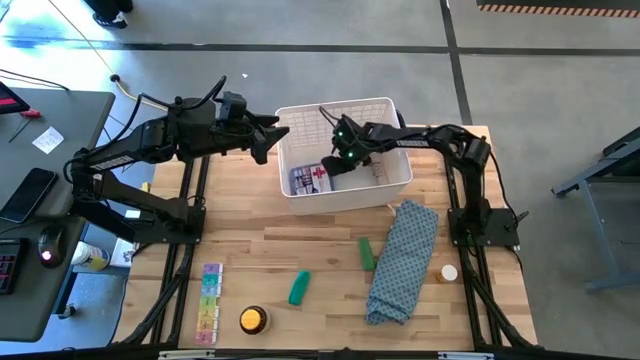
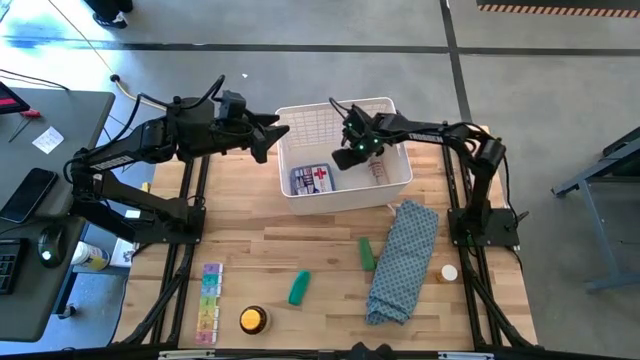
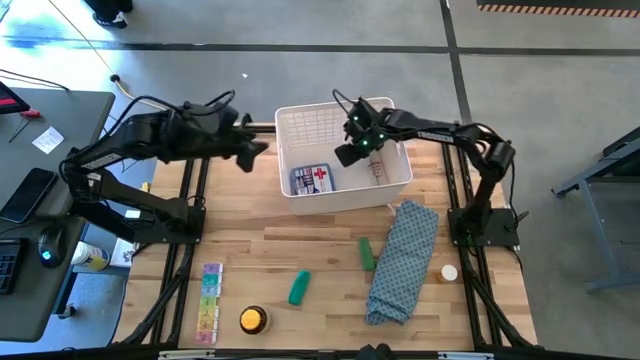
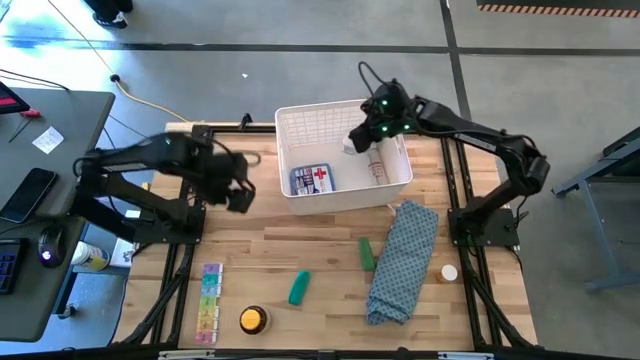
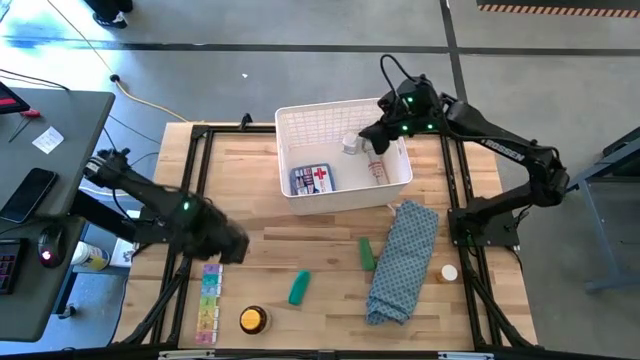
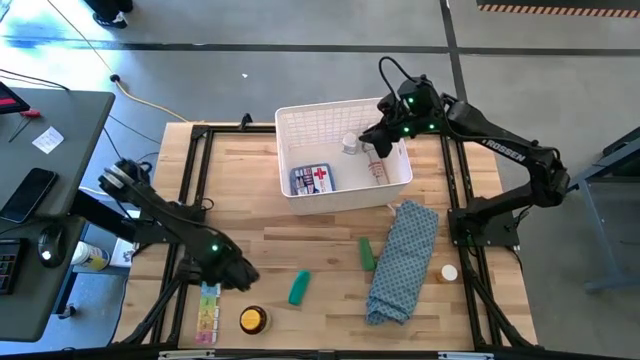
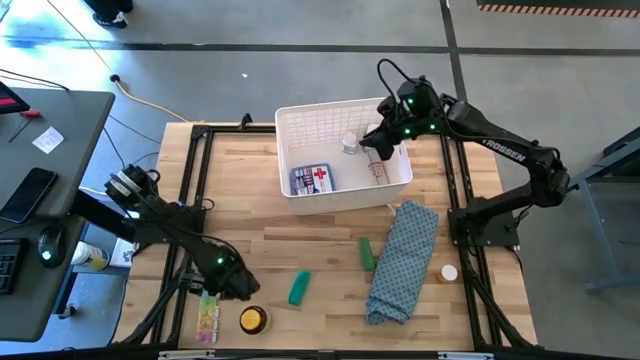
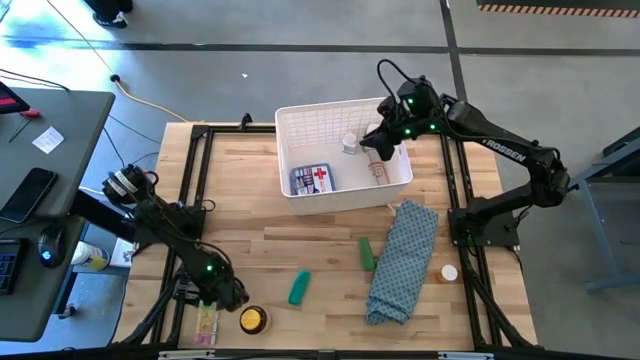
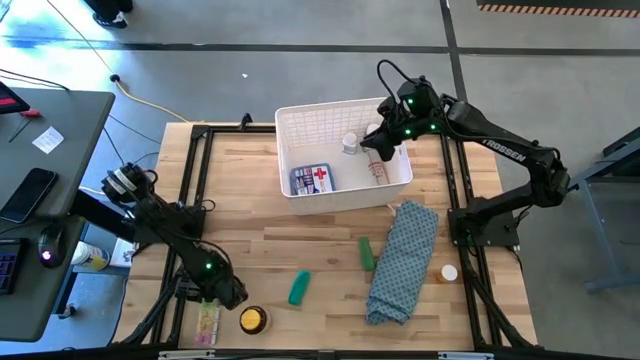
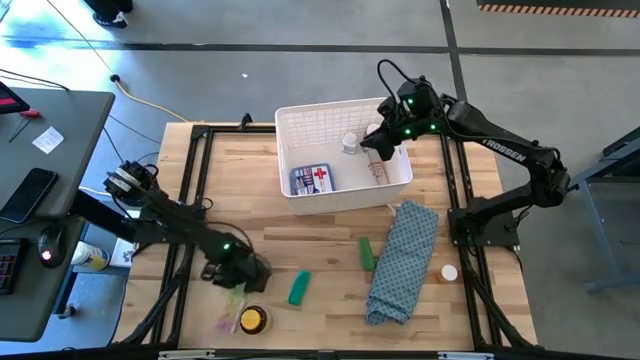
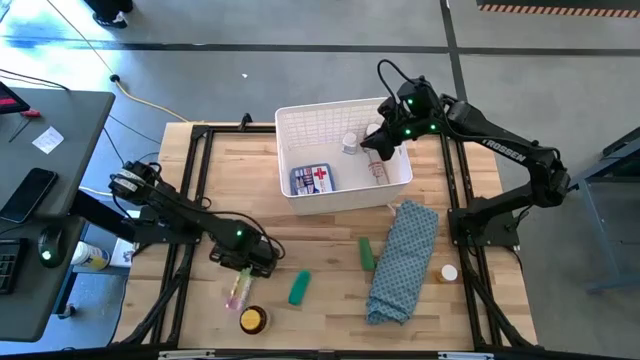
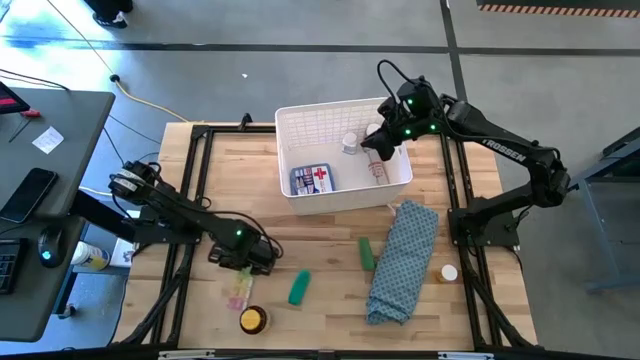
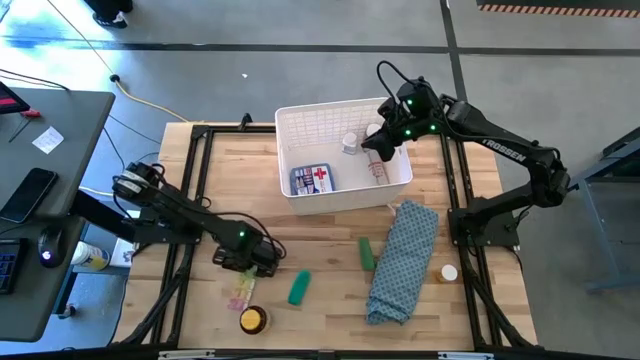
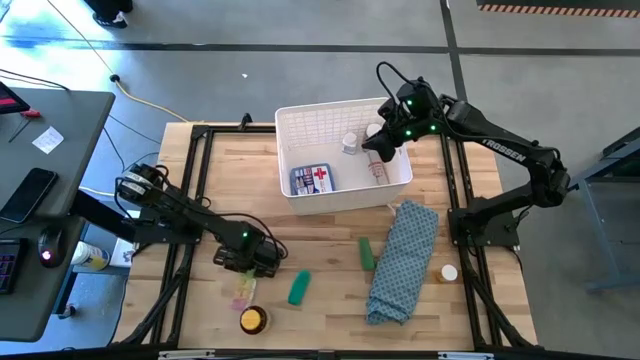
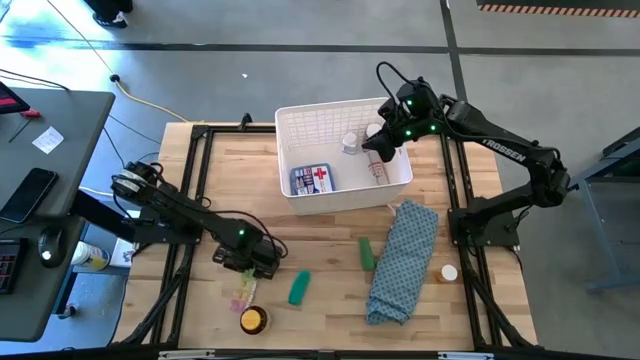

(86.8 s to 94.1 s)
Task: Pick & place medical supplies in basket/bin
Put the medicine organizer into the white bin

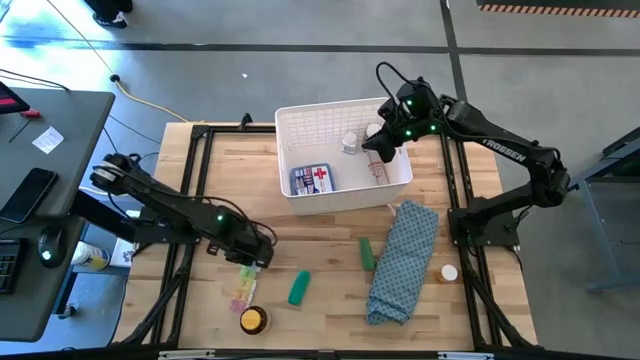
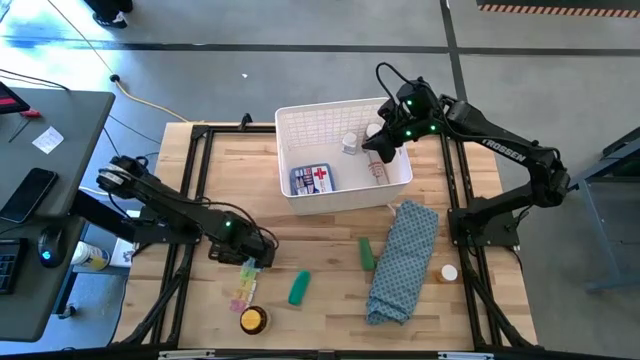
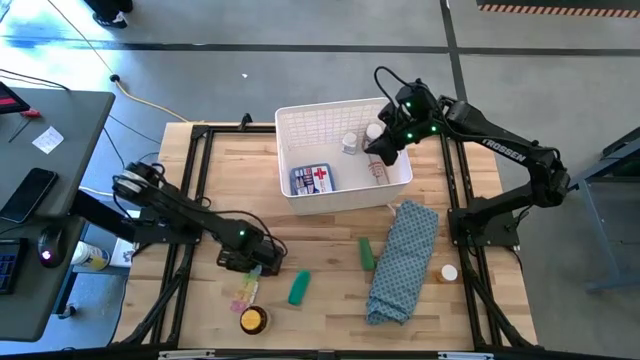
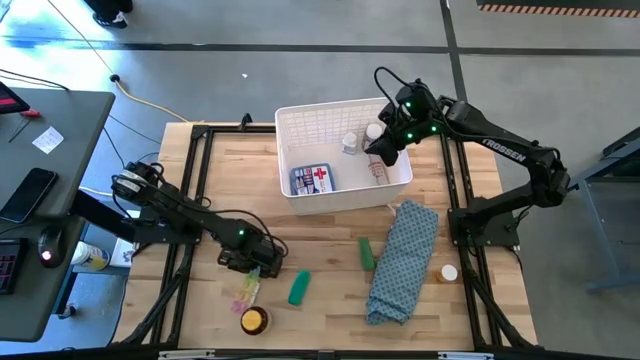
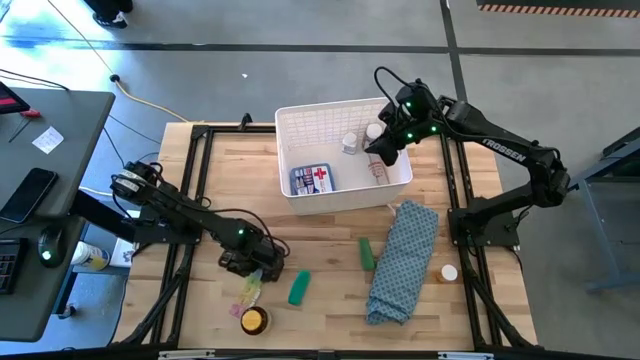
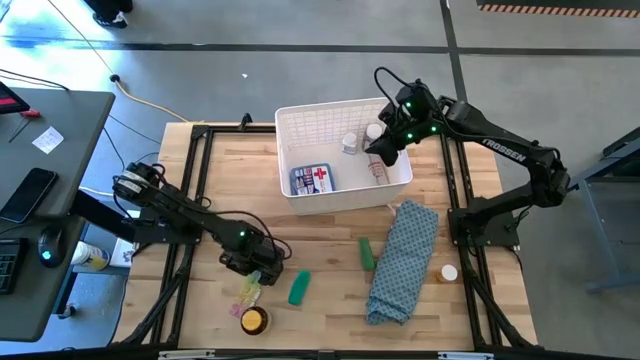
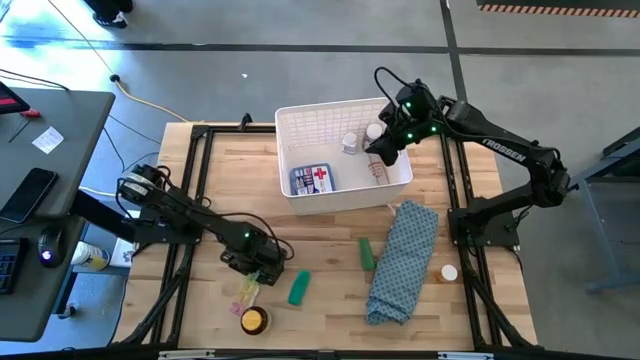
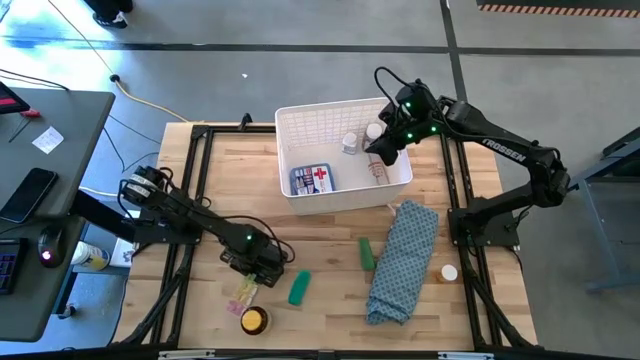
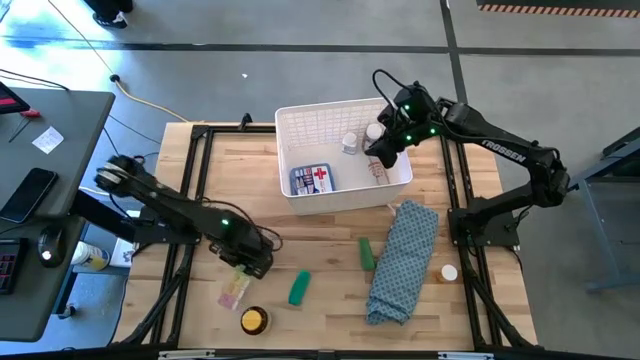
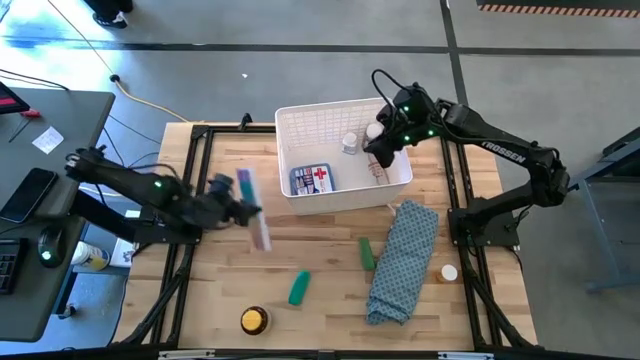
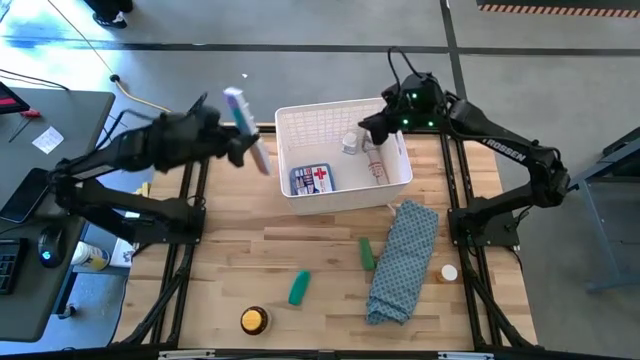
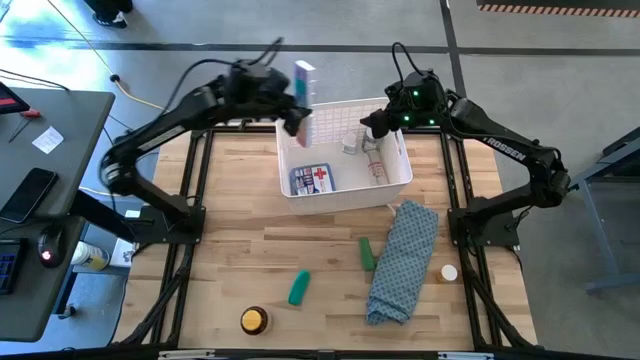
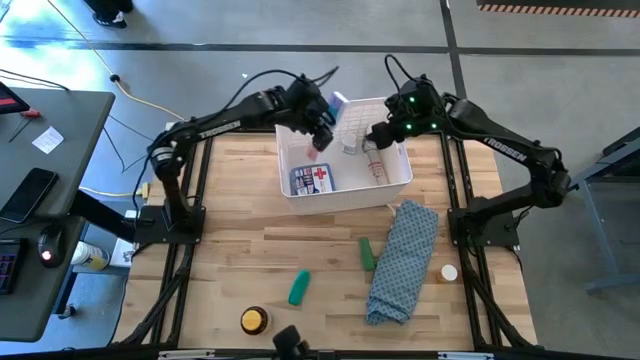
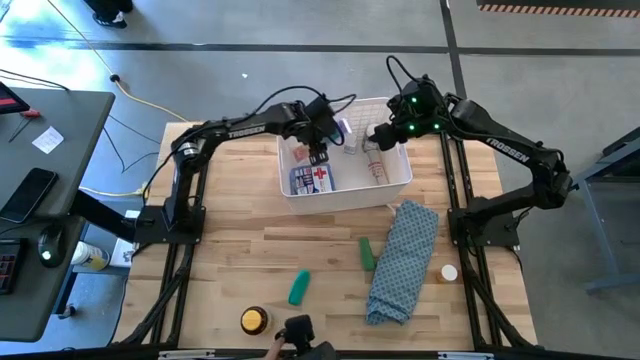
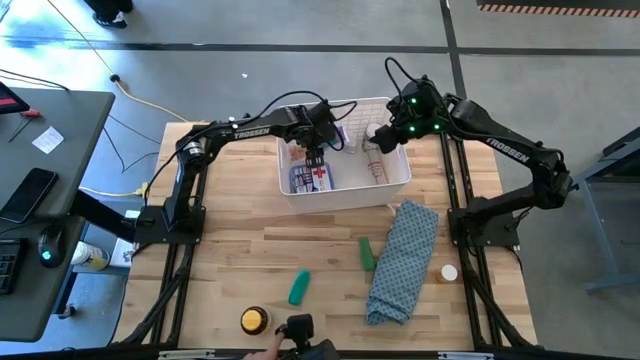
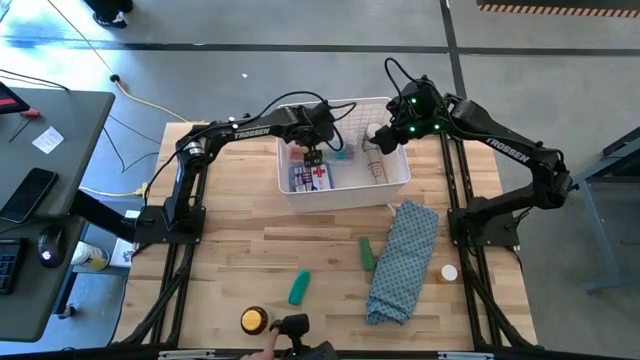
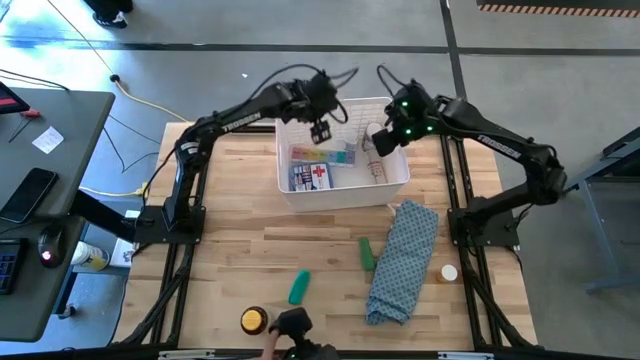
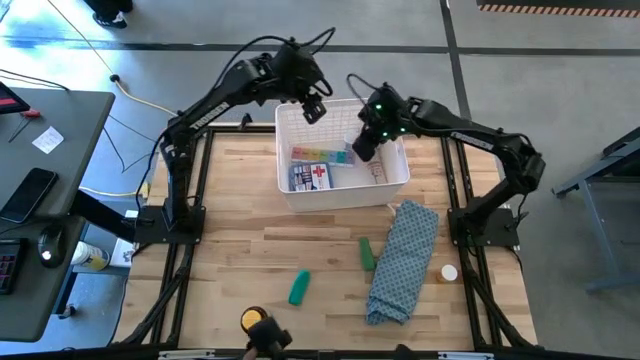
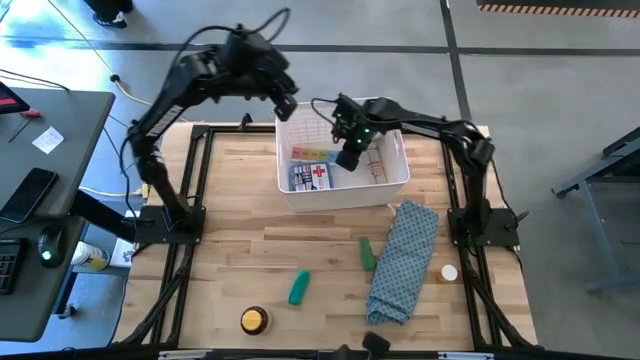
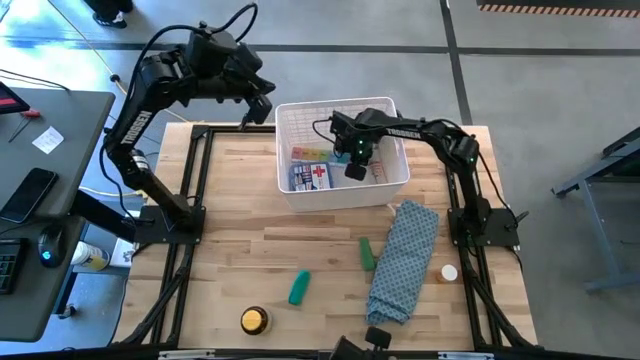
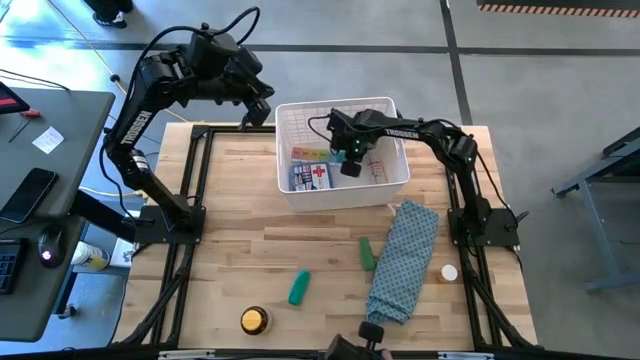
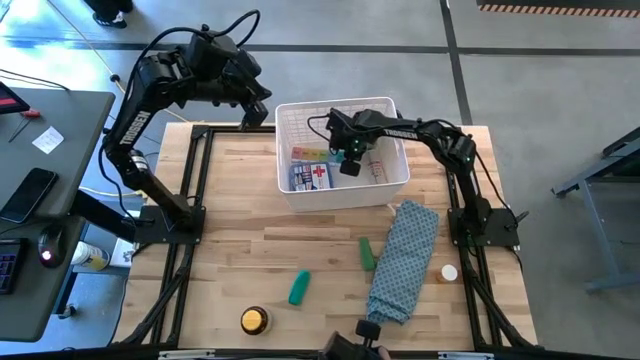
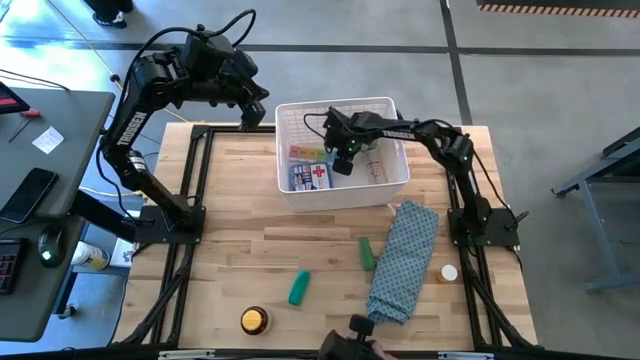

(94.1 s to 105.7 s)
Put the medicine organizer into the white bin

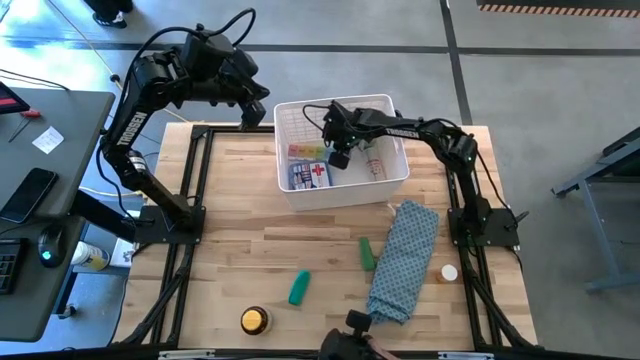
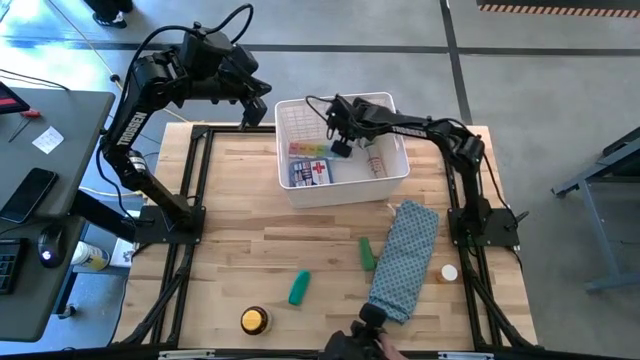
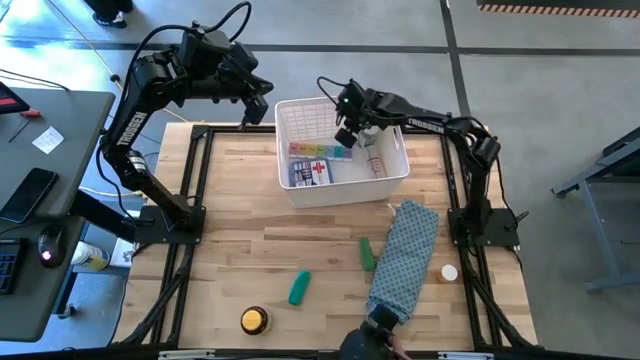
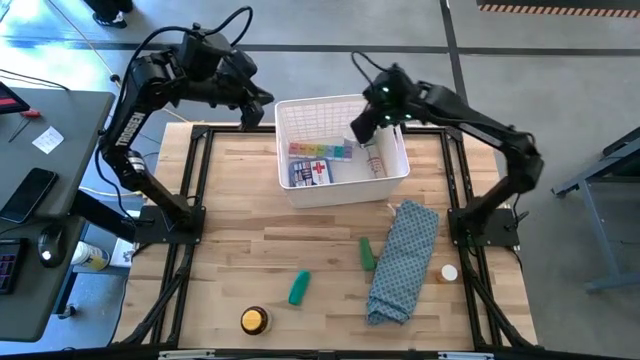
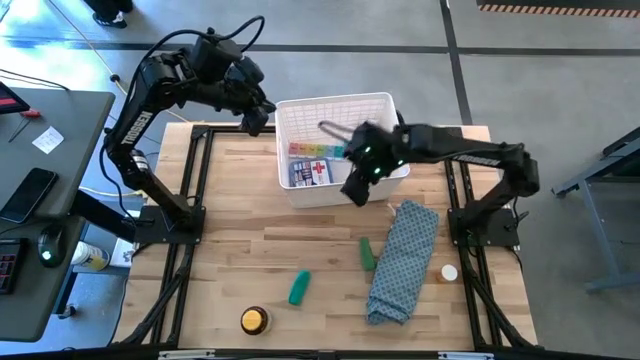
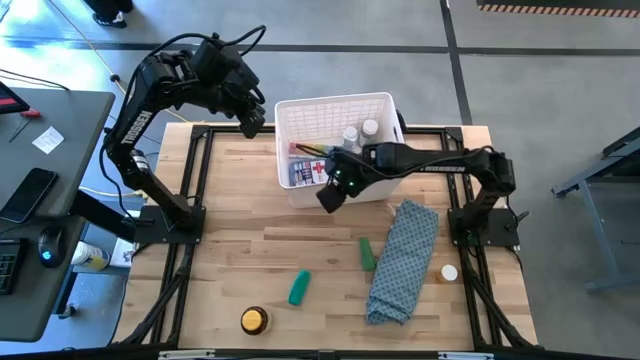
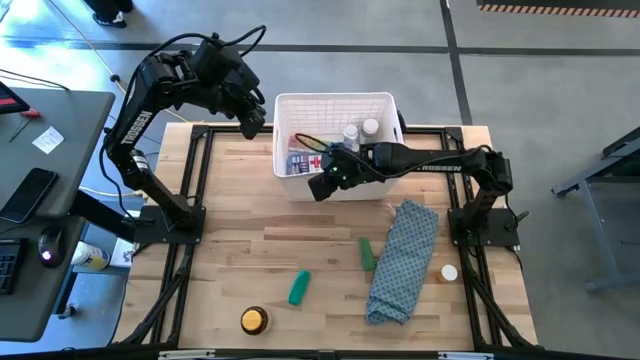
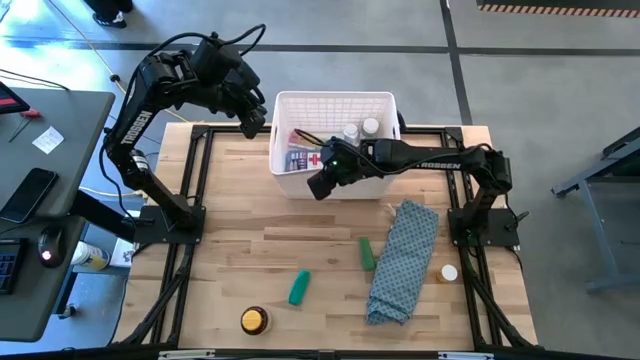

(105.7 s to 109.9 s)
Adjust the white bin
